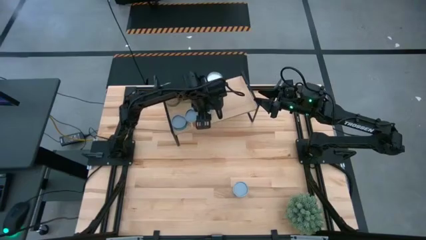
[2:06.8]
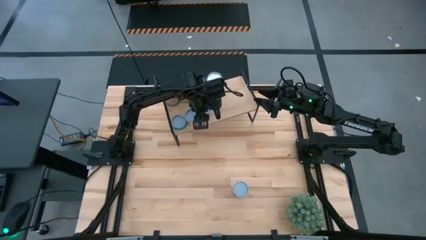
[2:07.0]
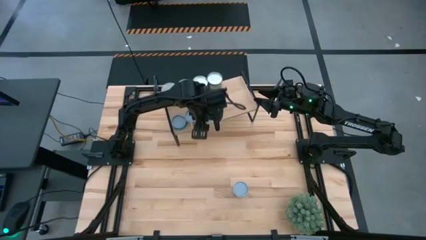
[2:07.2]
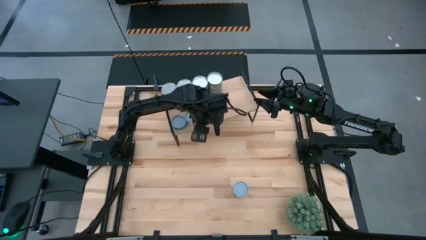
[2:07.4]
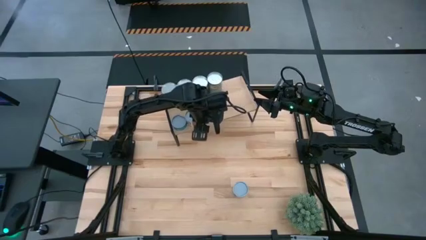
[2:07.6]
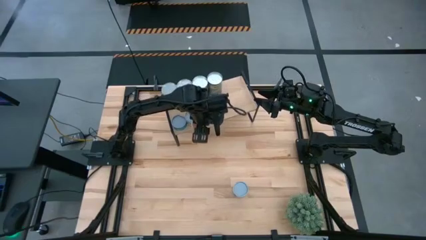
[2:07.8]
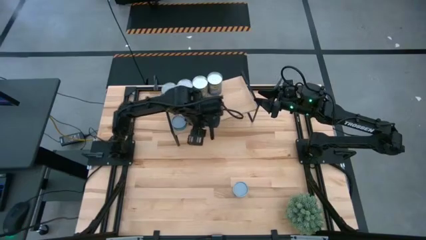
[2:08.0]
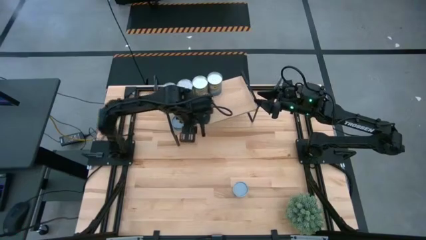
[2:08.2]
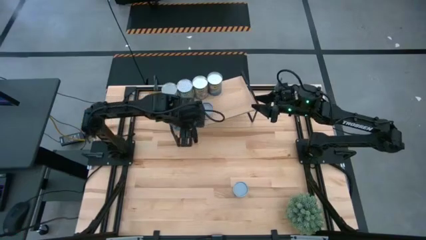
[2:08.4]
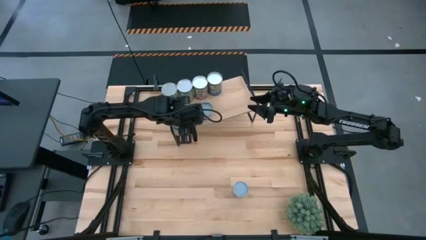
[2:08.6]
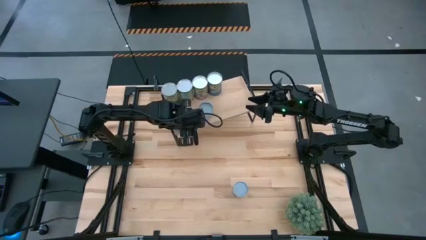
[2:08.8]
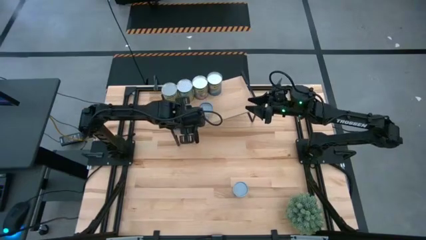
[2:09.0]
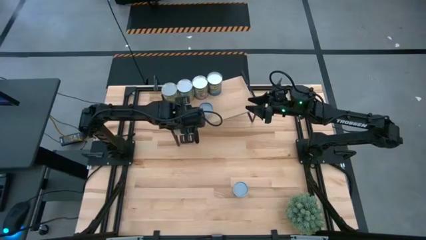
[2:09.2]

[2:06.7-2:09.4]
Task: Pick and place cans onto a shelf
Adjust the canned tomatoes on the shelf

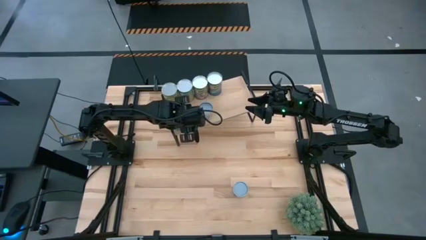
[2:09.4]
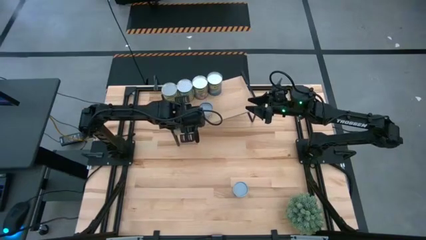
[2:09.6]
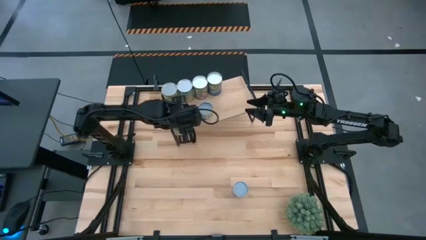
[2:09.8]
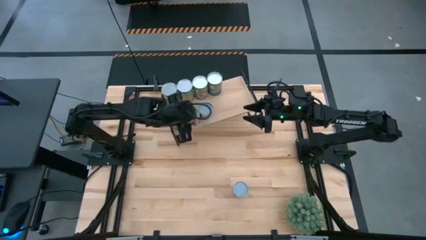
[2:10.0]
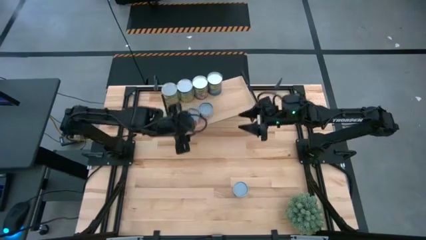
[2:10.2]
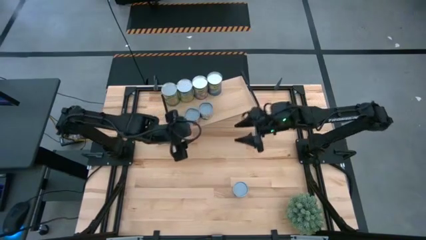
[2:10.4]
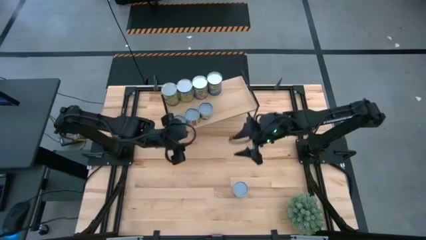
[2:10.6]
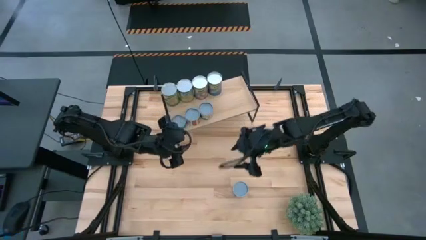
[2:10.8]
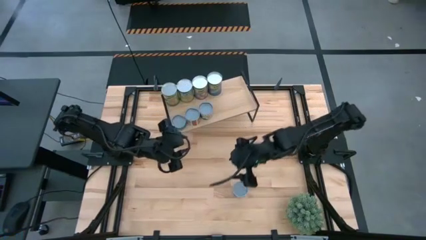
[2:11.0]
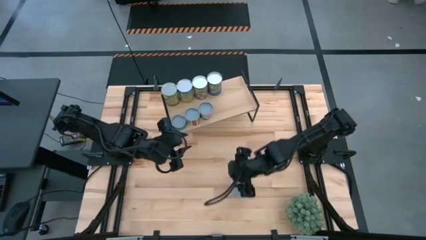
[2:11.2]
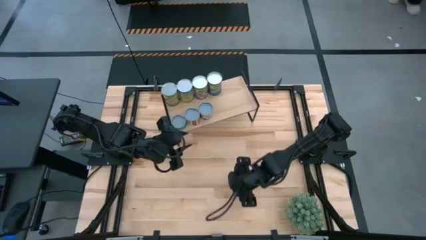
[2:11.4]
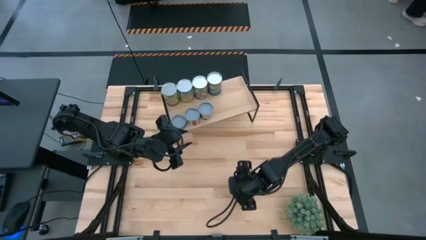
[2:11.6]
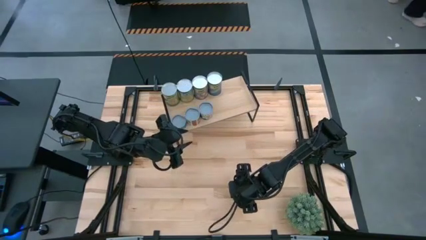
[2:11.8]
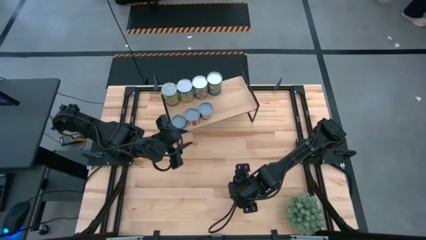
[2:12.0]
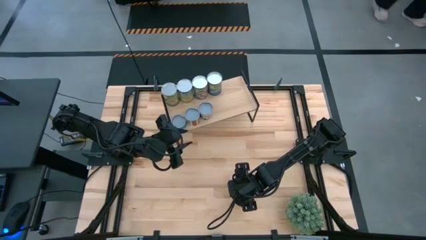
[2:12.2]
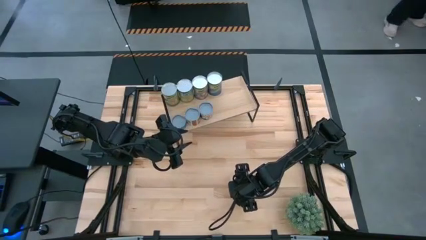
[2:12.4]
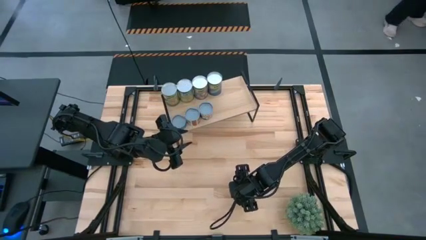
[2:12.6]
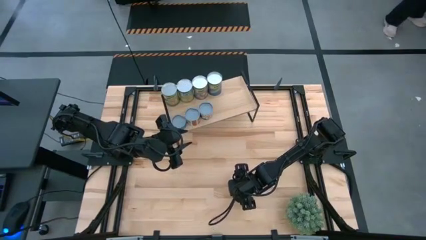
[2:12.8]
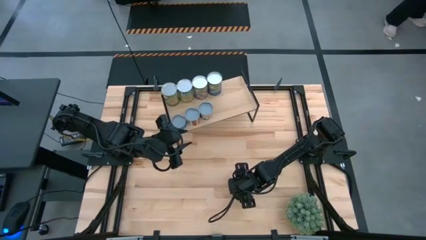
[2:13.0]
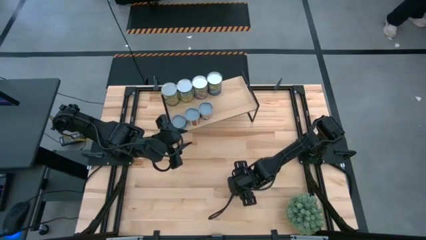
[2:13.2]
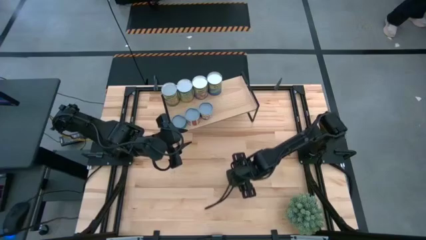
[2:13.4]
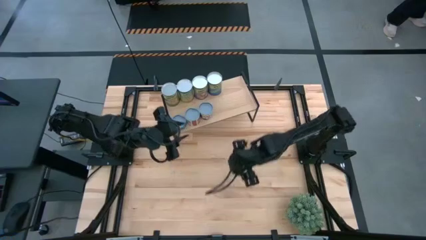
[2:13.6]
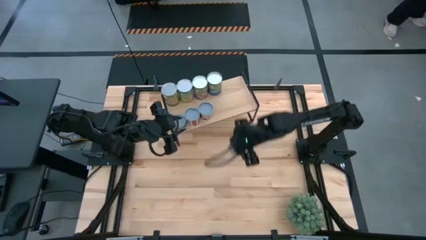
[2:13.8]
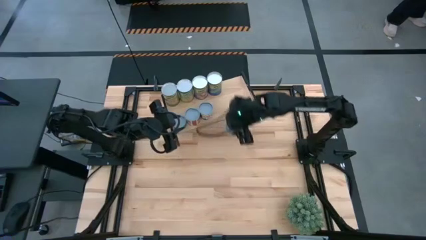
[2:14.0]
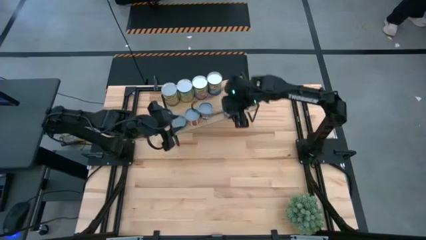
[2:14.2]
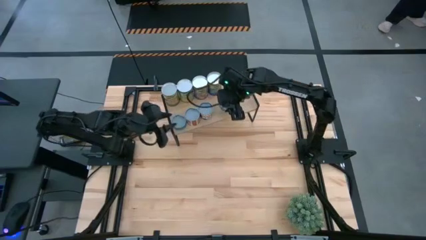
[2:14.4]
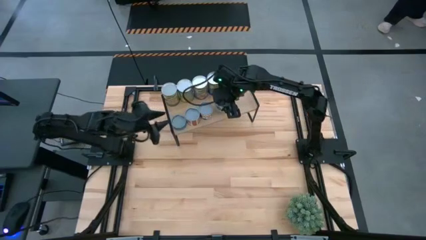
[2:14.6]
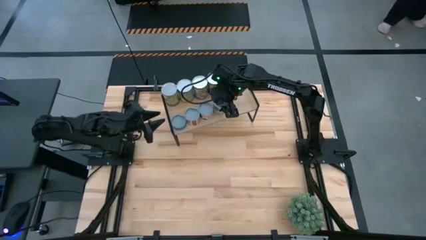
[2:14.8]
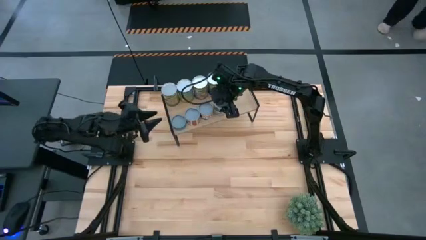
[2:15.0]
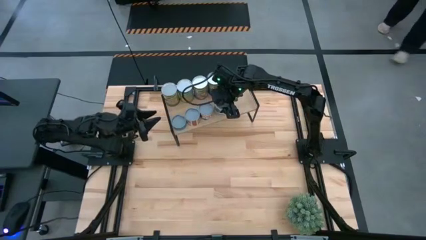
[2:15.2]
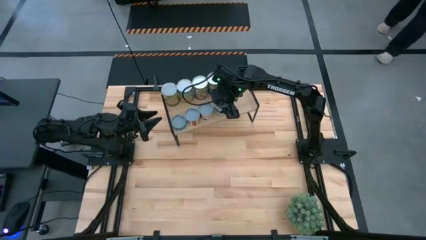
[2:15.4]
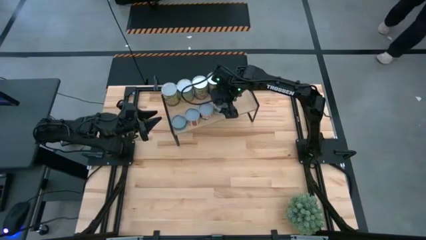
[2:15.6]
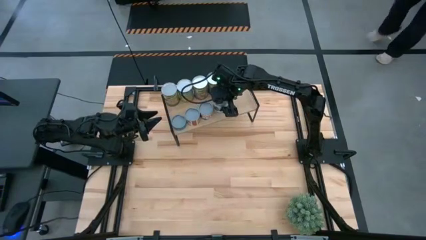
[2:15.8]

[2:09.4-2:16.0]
Put the canned mixed vegetables on the shelf

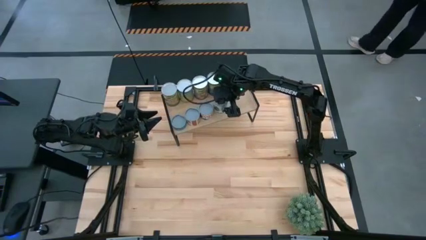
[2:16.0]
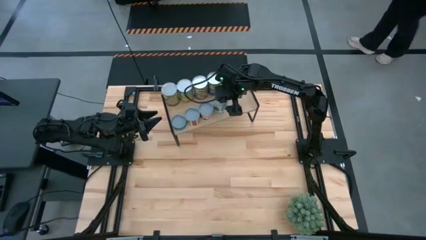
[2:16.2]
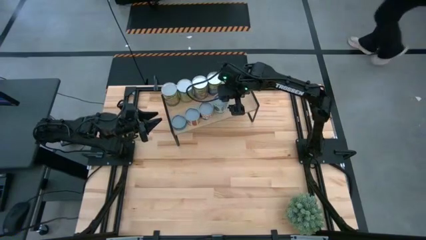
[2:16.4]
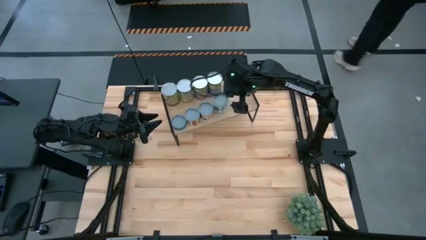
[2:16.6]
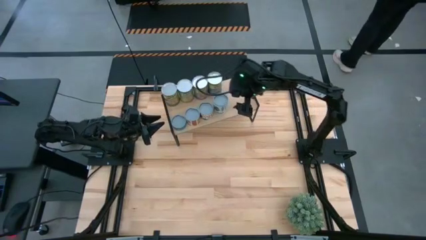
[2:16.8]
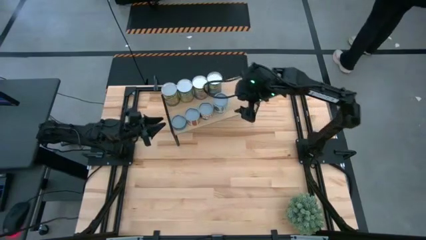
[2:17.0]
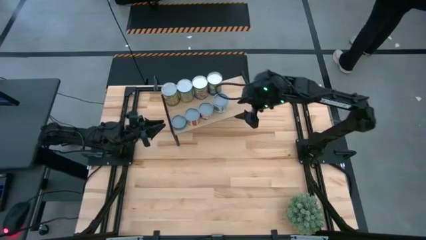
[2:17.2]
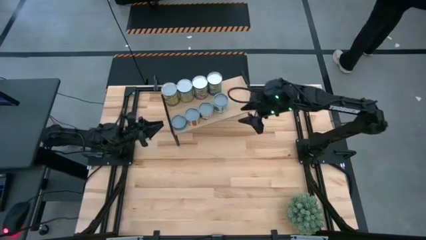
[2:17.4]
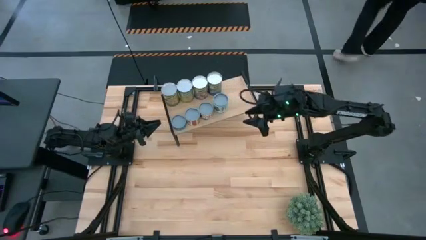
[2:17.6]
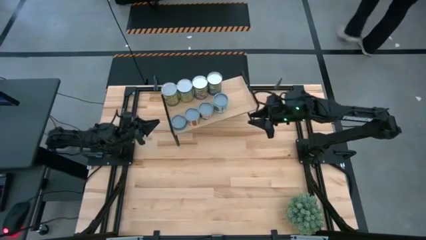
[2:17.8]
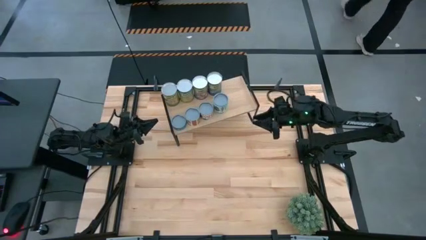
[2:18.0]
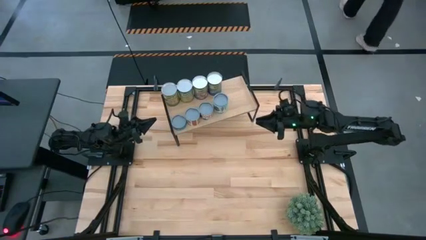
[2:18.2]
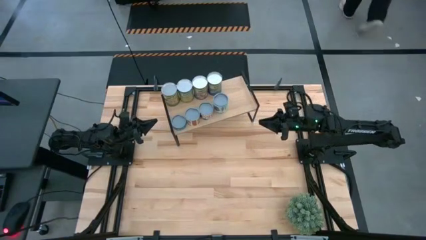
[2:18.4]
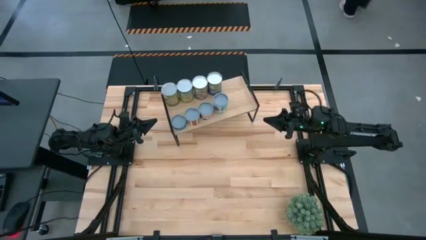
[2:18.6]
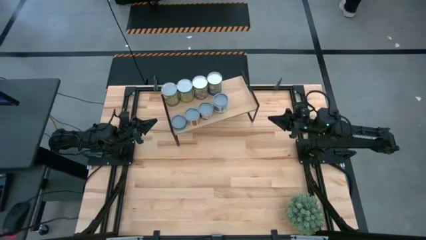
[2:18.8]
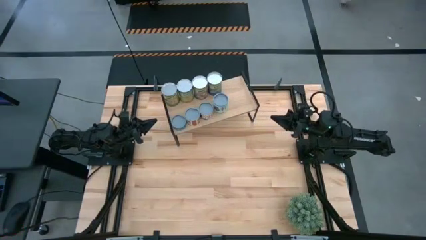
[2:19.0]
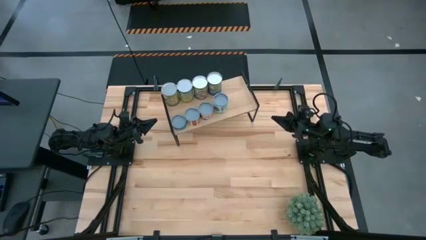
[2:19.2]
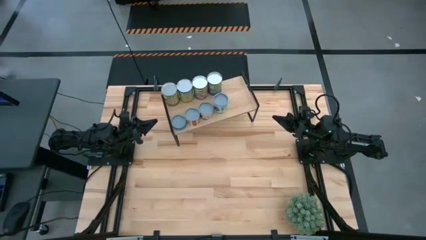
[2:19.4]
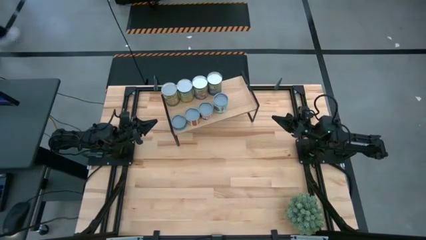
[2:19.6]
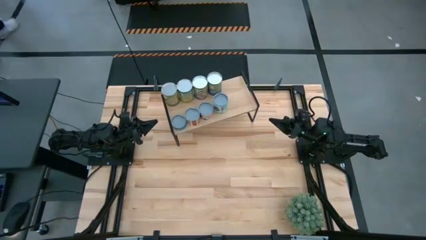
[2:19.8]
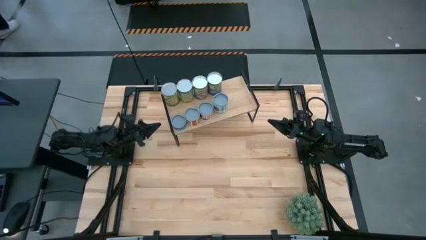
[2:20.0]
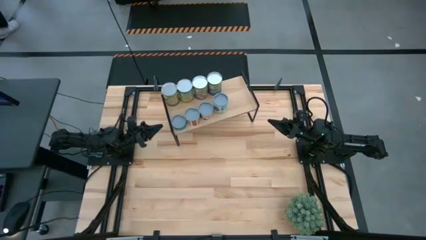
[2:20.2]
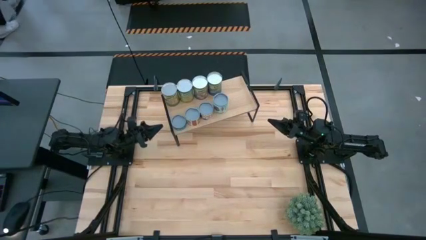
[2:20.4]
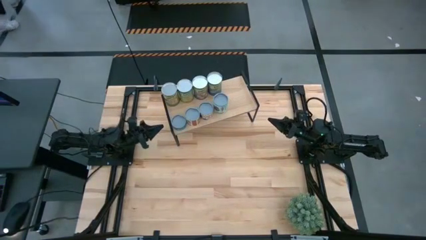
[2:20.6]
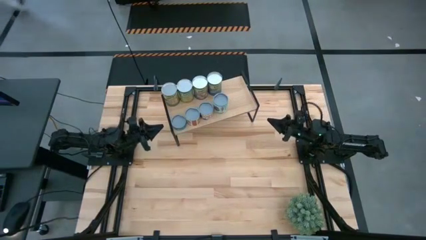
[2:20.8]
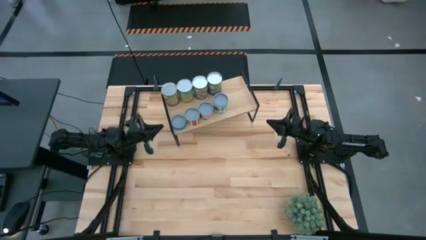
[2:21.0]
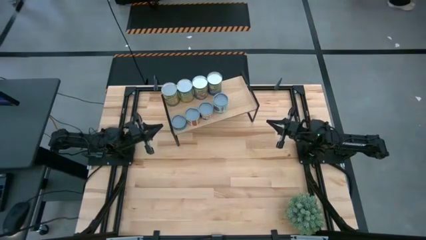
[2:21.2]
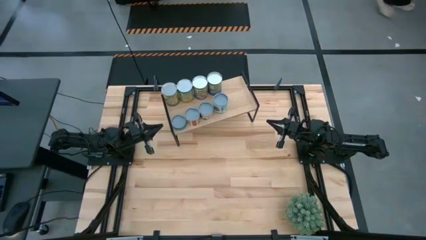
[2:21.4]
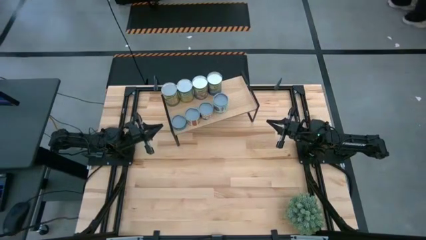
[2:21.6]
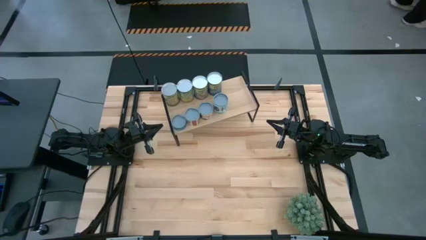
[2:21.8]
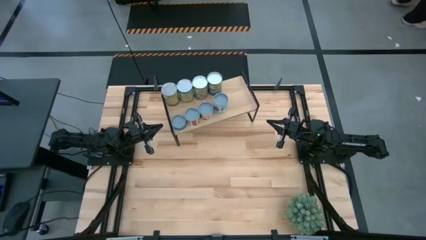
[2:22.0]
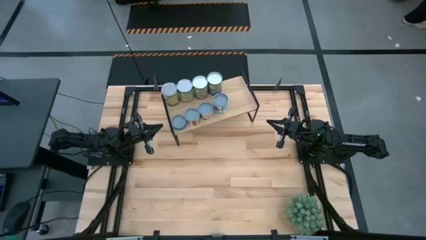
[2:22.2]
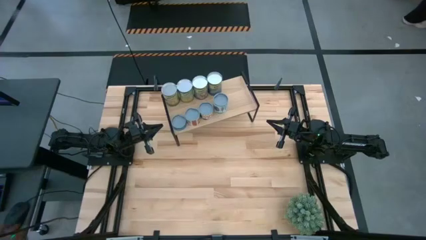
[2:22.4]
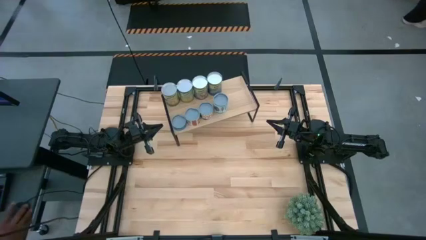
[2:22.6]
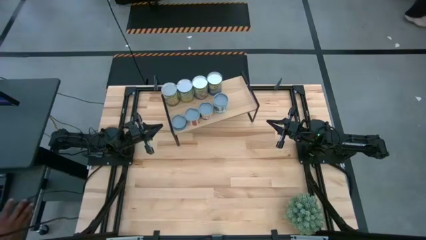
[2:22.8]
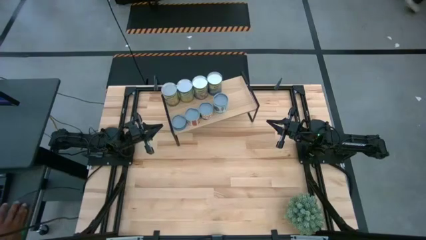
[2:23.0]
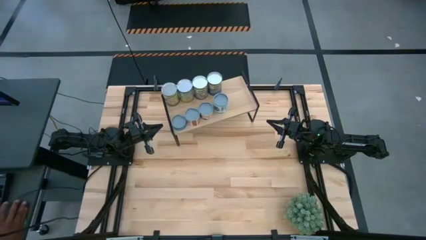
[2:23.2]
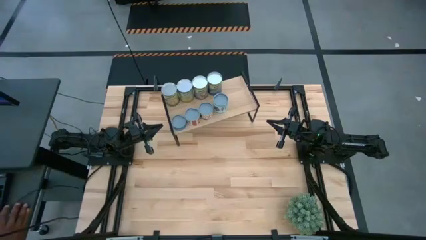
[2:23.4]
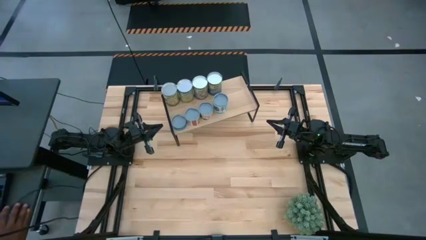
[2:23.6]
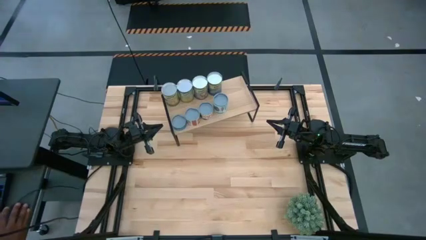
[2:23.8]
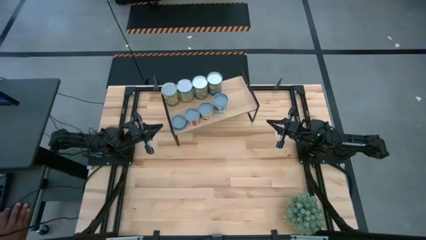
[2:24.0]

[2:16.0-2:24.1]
Return to Home Position
